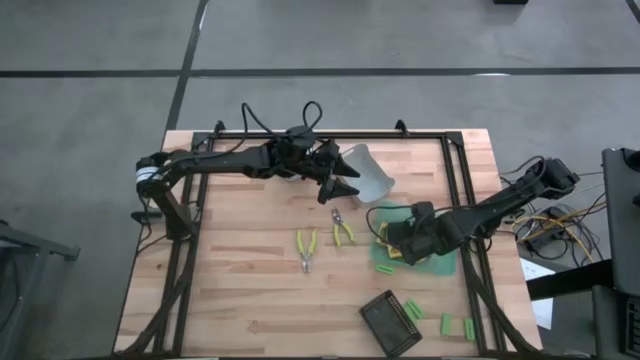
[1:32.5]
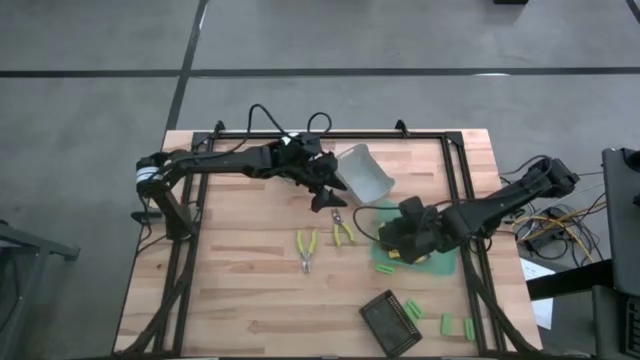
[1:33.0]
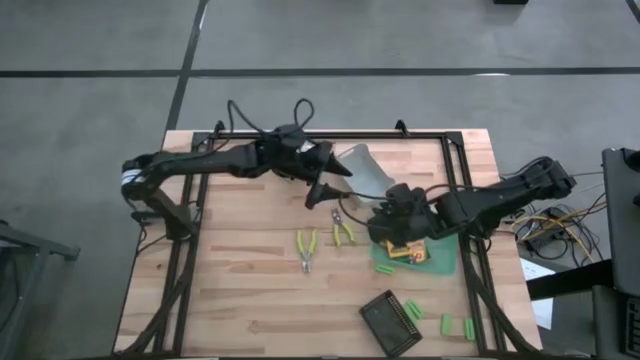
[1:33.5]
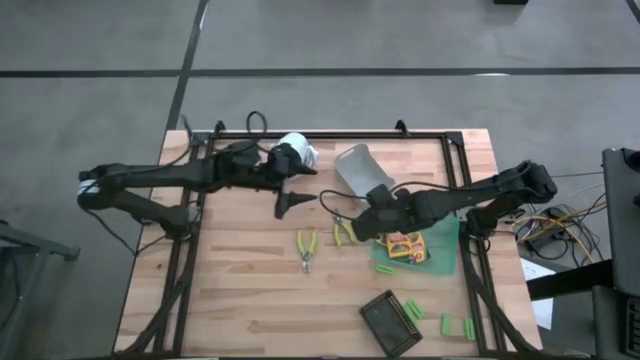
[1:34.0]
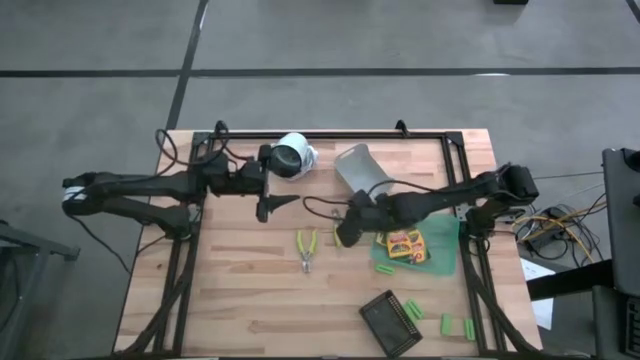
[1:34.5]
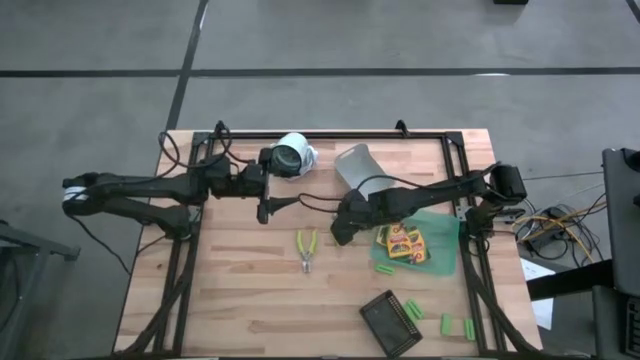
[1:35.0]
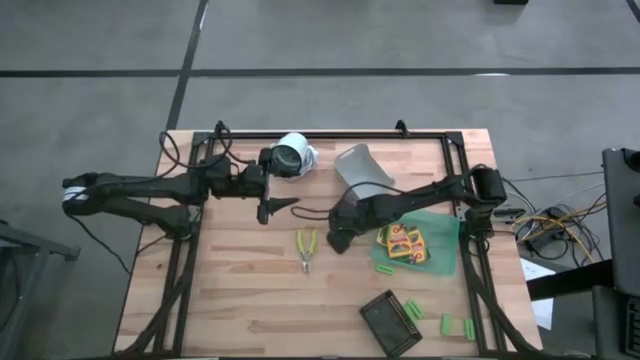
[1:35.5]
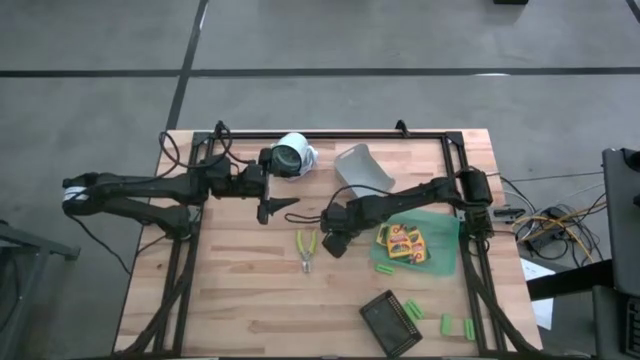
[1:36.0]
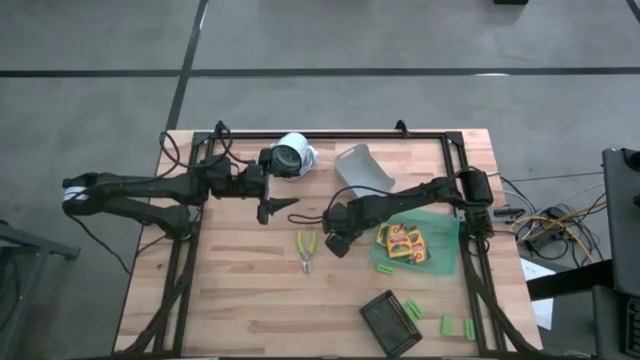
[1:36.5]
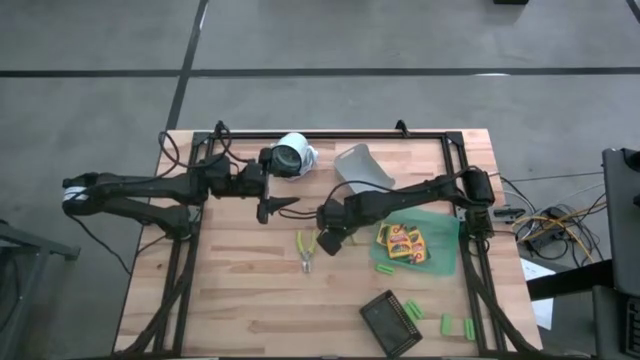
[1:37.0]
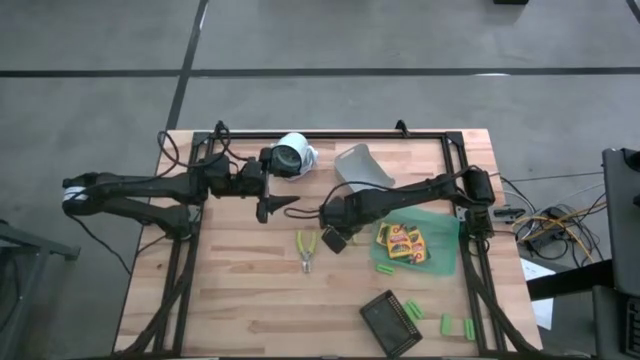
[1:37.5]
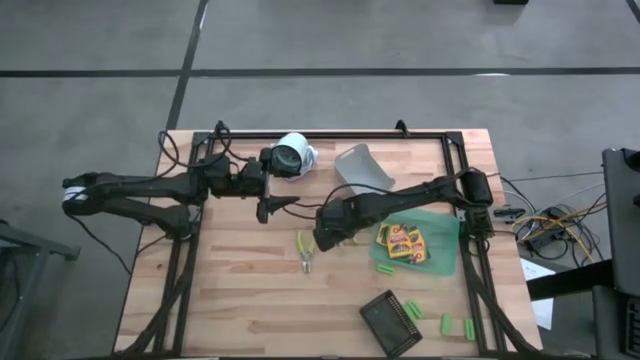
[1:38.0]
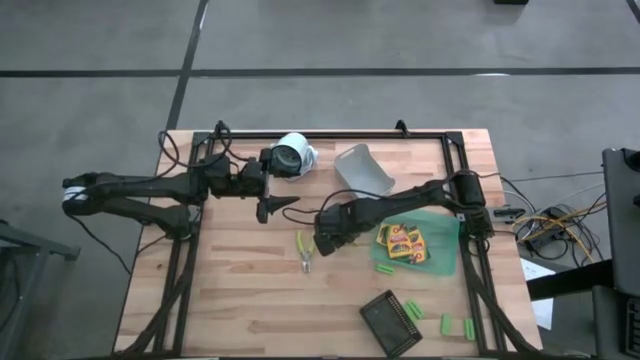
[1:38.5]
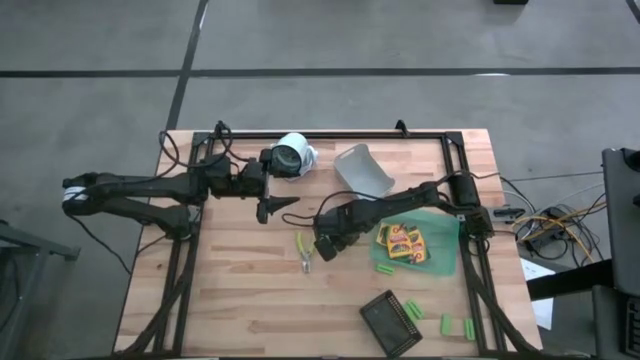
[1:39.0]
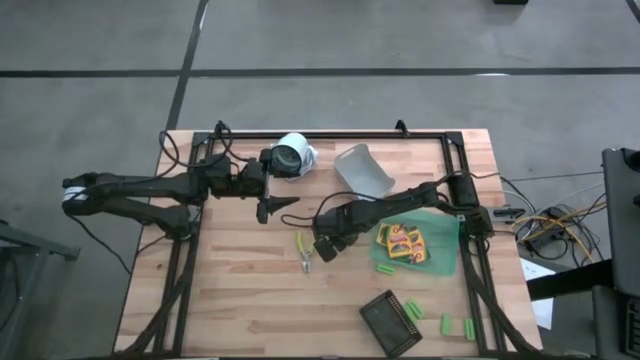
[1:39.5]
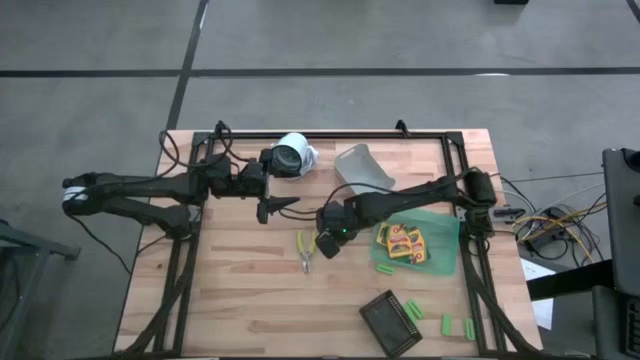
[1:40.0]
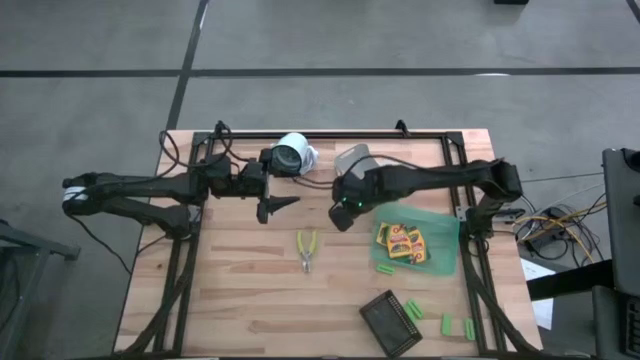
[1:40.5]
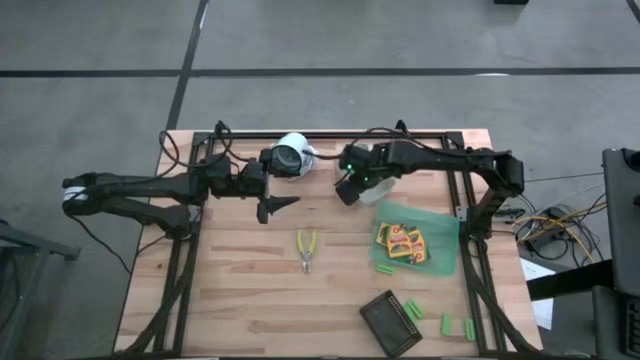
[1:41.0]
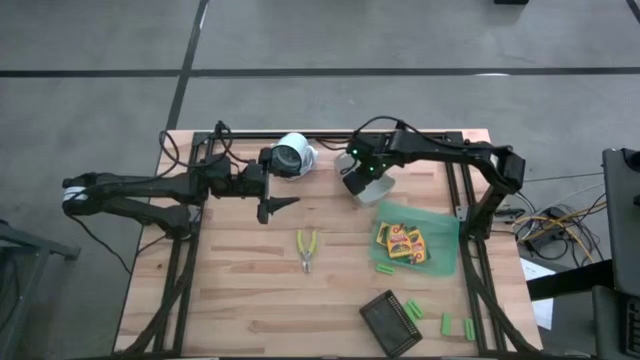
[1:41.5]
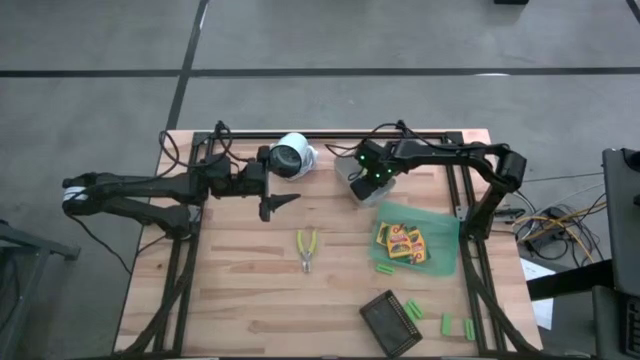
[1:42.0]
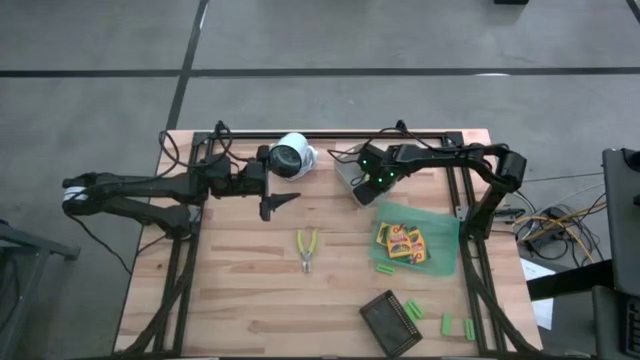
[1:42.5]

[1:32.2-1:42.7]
Task: Pick & Place School Supplies
Put the green hole puncher into the gray bin

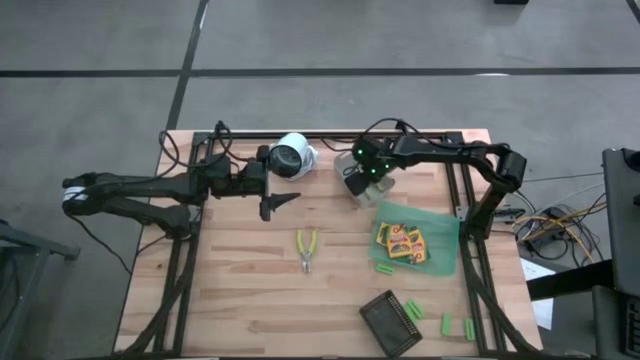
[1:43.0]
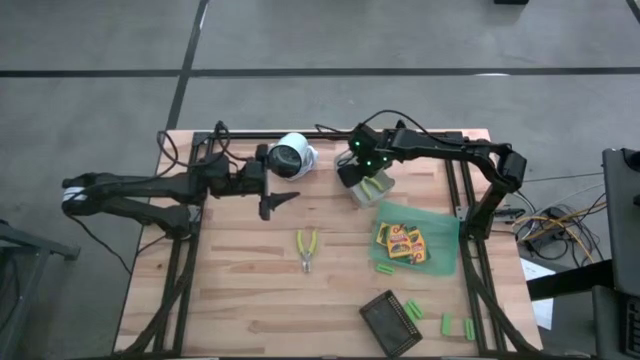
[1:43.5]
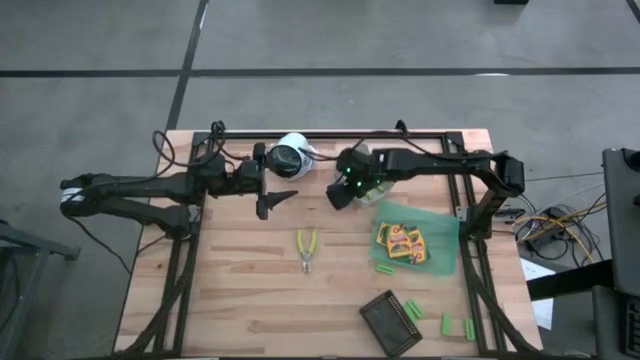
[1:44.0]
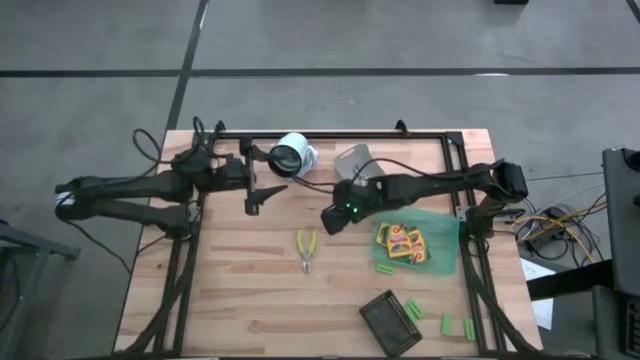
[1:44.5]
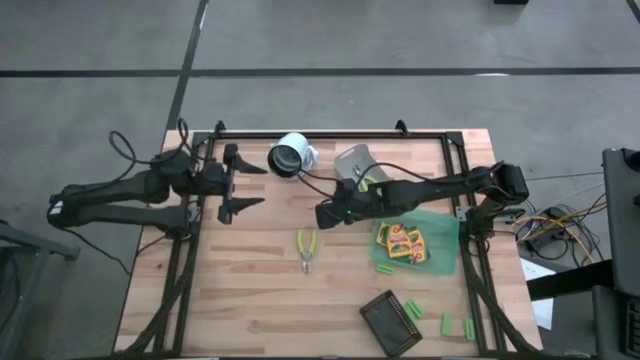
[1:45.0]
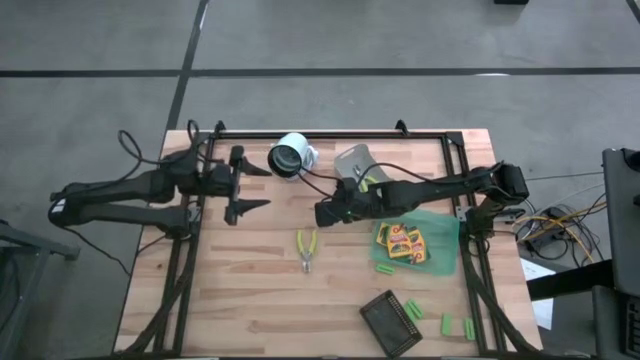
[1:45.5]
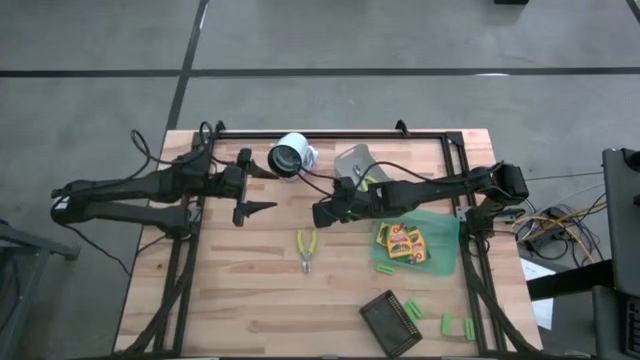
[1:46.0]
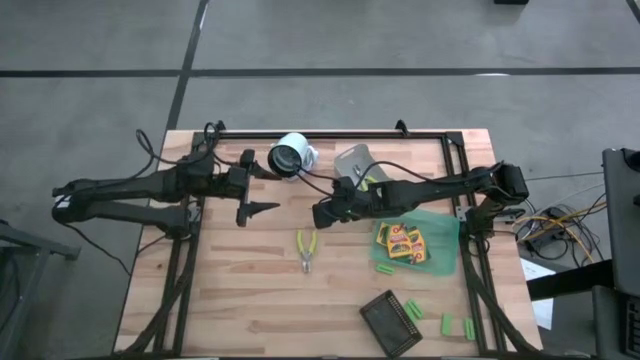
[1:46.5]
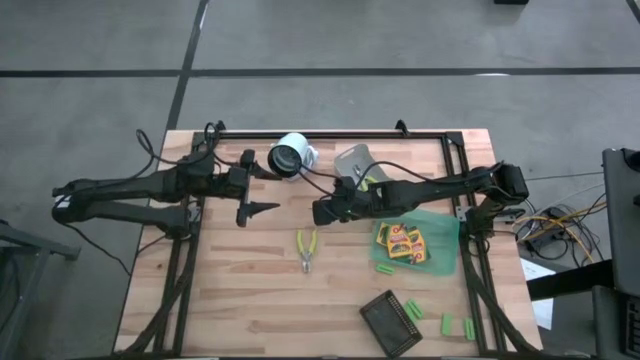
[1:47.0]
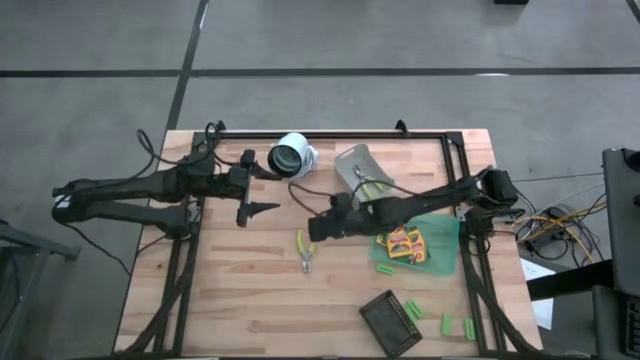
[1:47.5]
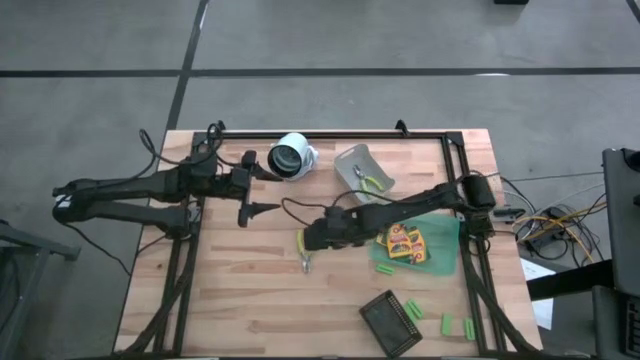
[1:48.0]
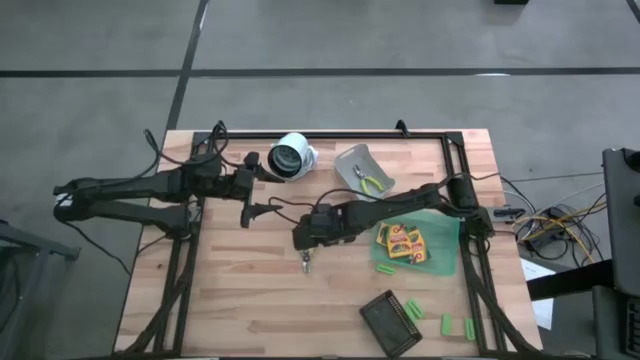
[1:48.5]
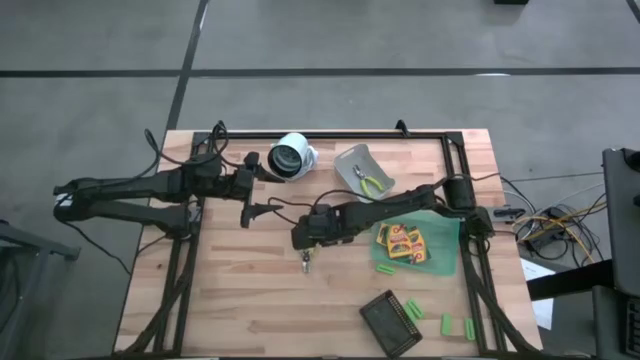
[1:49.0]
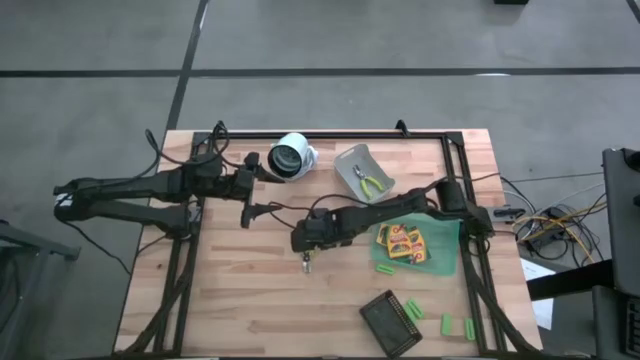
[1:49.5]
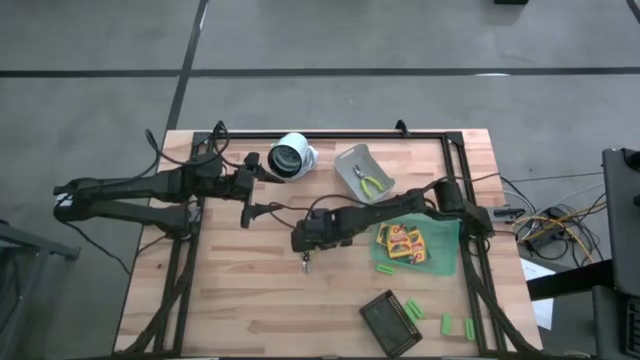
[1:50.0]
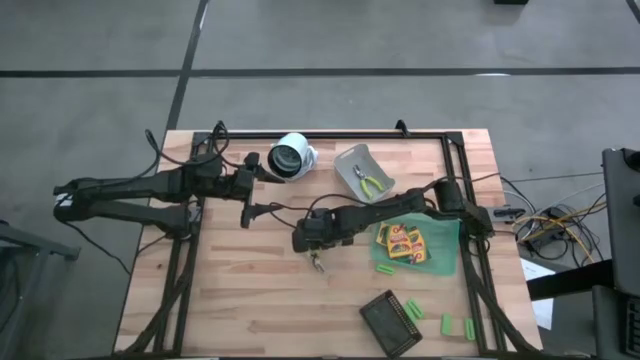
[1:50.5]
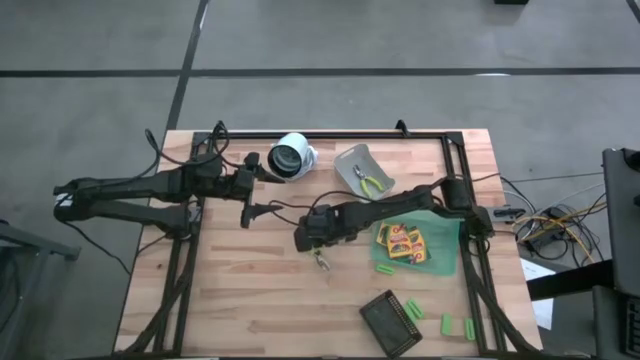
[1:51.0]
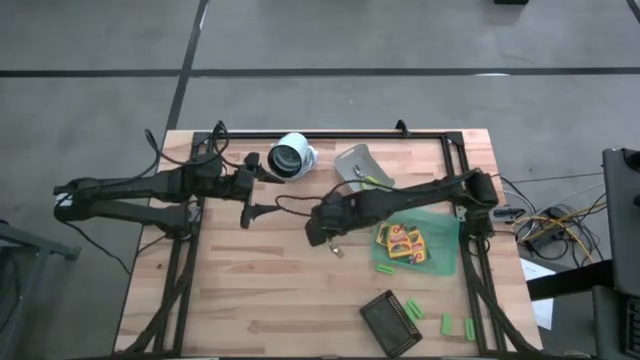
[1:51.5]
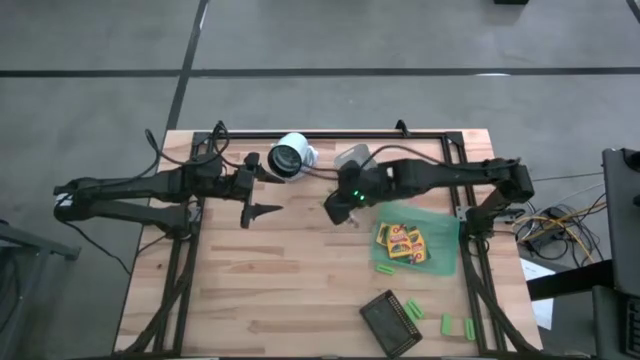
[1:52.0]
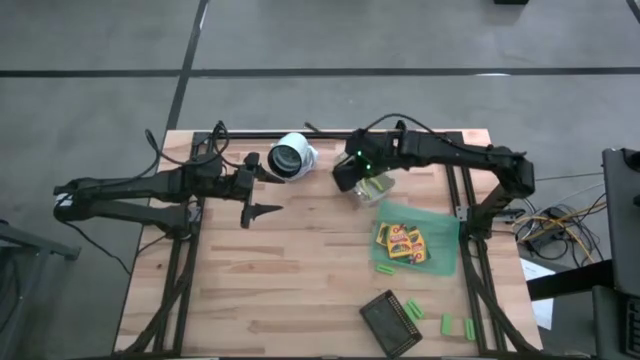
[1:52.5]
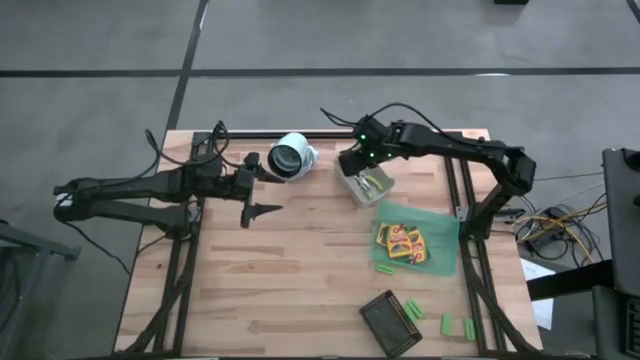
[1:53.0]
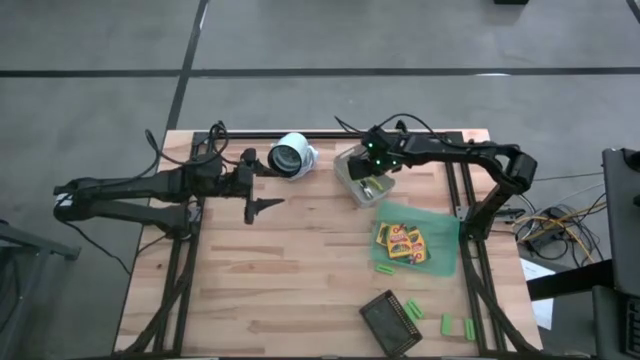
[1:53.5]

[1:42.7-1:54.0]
Put the green hole puncher into the gray bin
